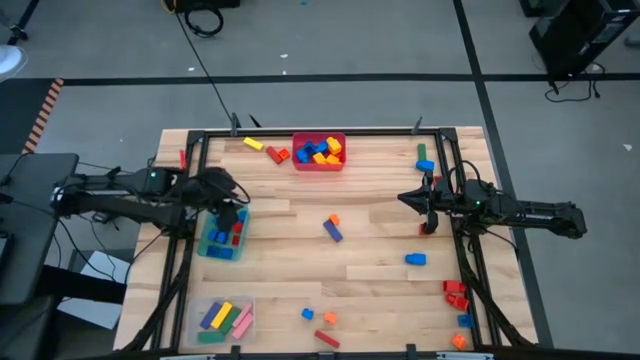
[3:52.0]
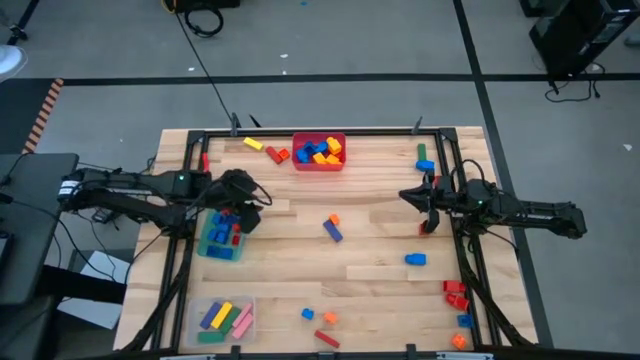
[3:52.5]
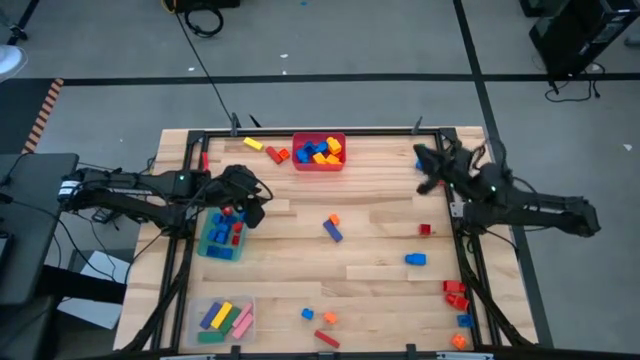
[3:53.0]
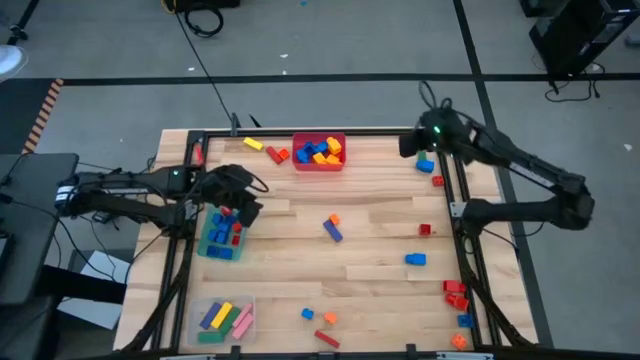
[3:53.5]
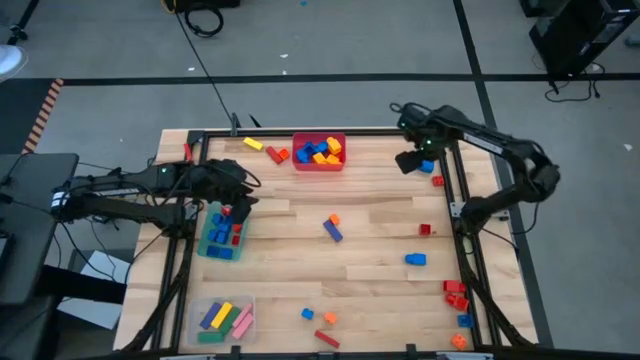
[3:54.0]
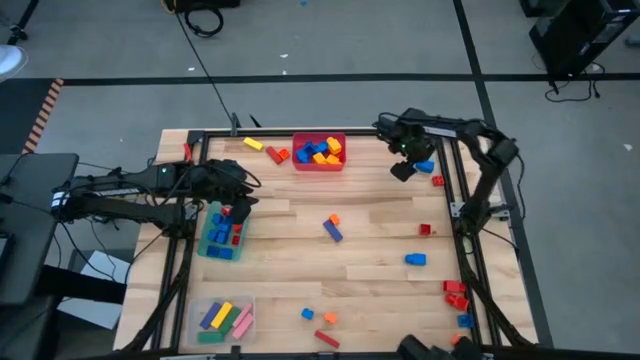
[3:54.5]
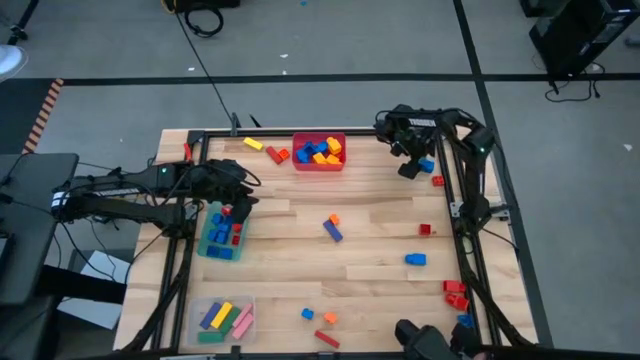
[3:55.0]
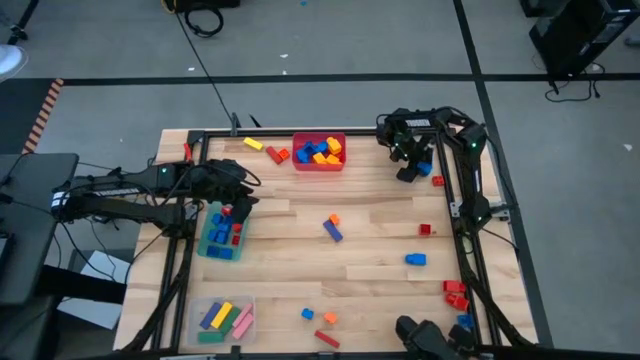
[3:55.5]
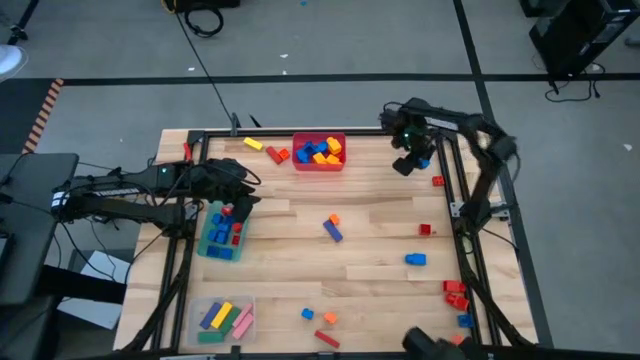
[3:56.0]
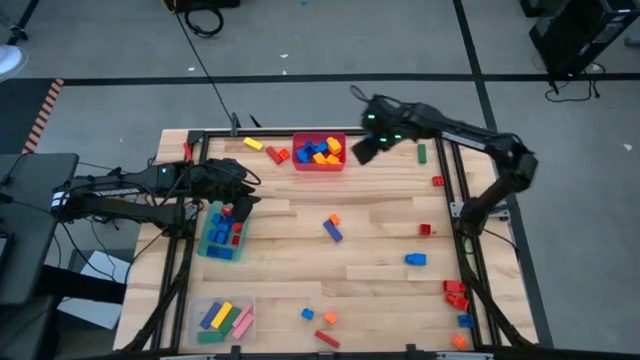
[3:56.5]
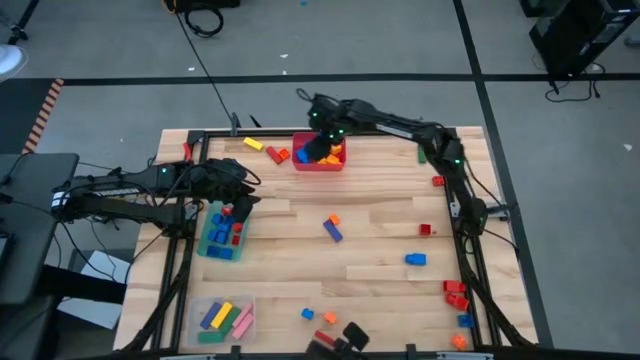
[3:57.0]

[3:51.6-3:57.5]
Task: Sort blocks by size
Put the blue 1 studded building block into the red bin

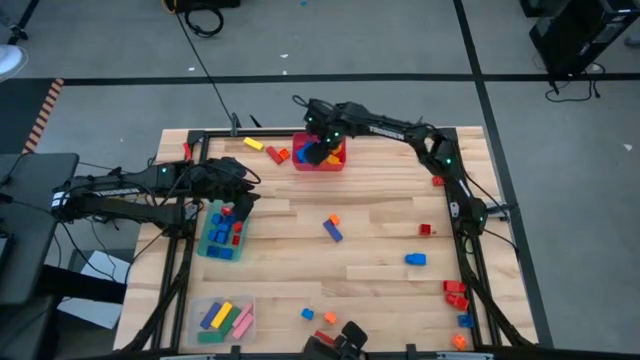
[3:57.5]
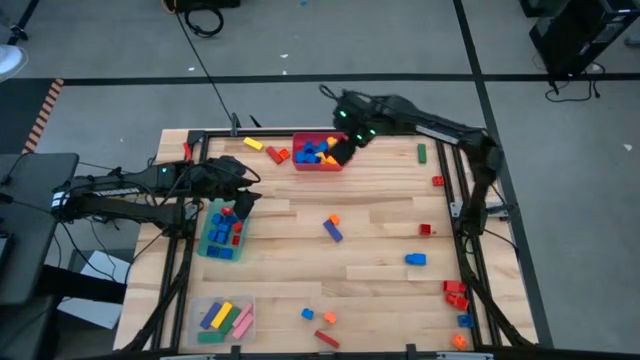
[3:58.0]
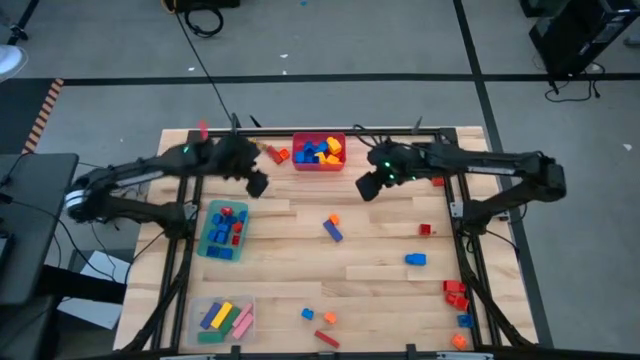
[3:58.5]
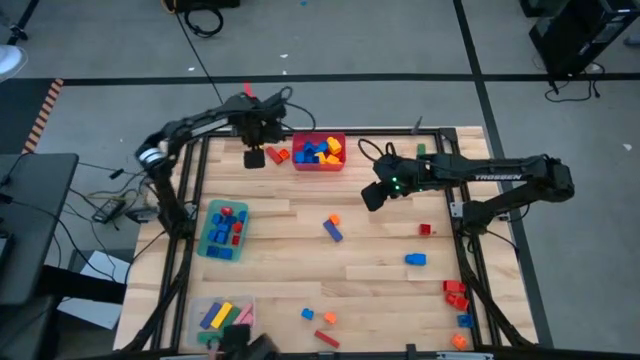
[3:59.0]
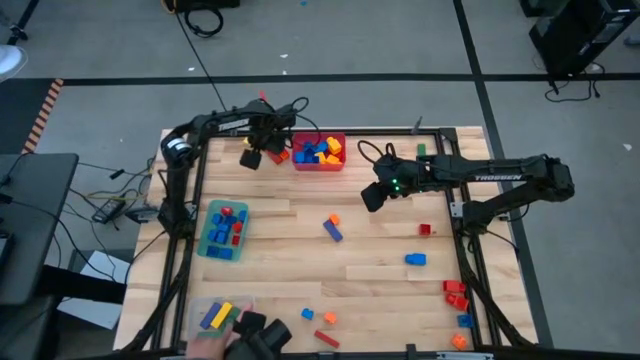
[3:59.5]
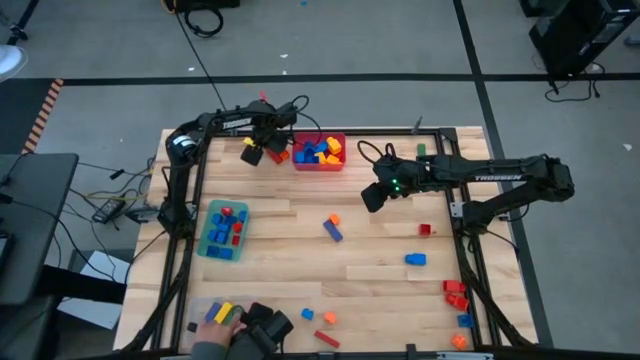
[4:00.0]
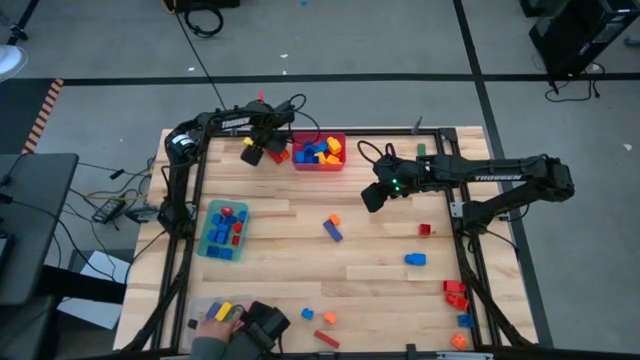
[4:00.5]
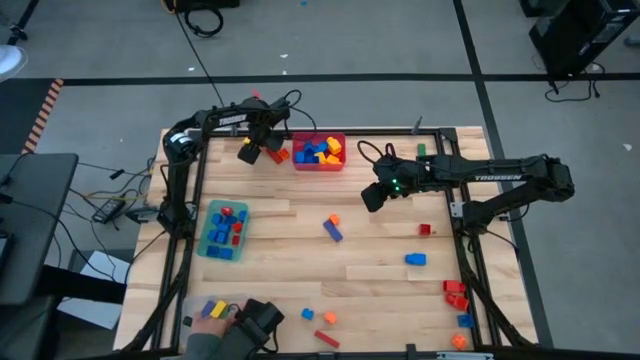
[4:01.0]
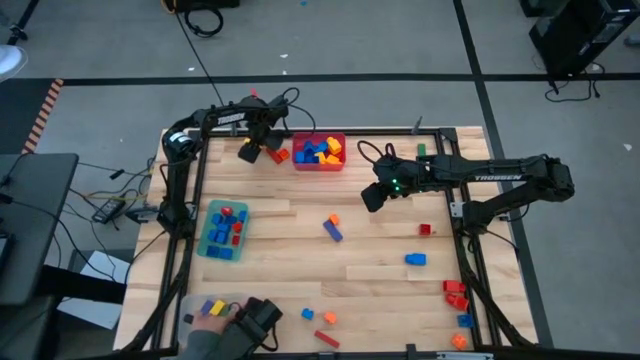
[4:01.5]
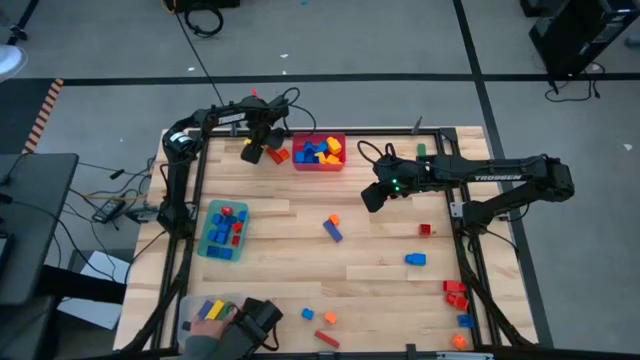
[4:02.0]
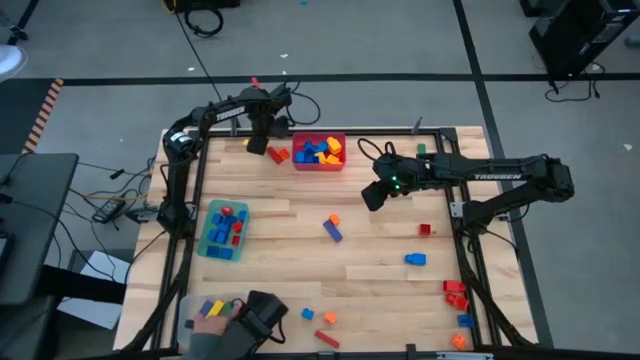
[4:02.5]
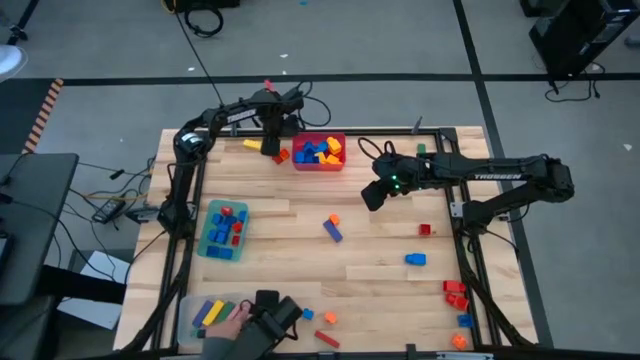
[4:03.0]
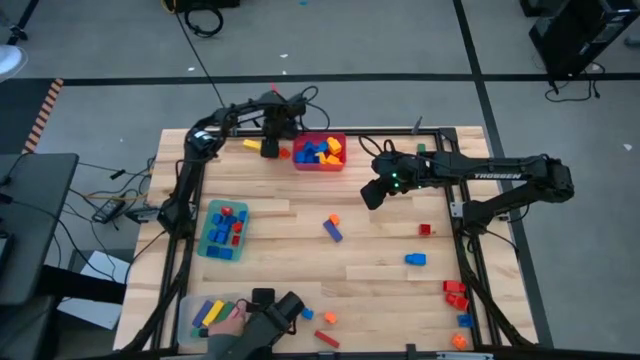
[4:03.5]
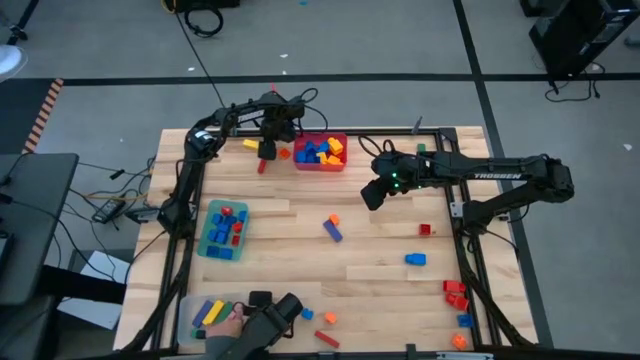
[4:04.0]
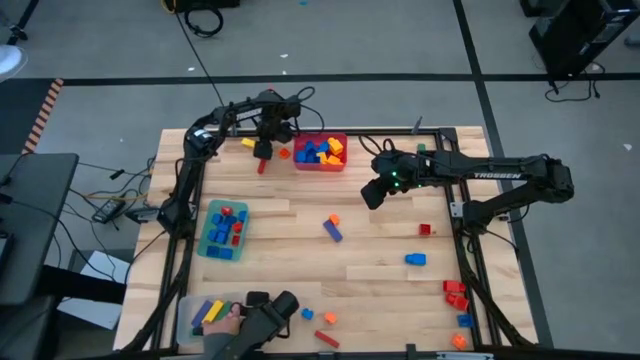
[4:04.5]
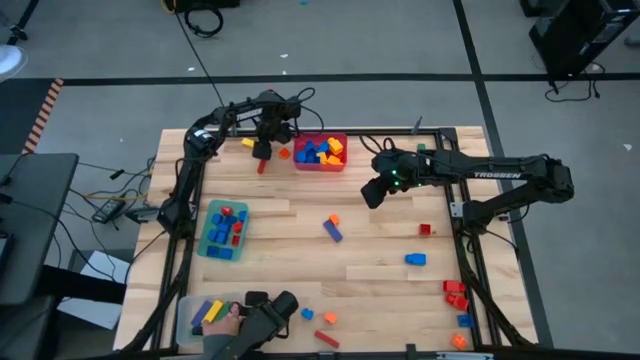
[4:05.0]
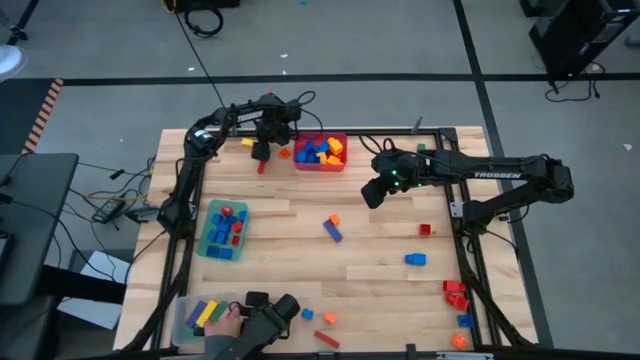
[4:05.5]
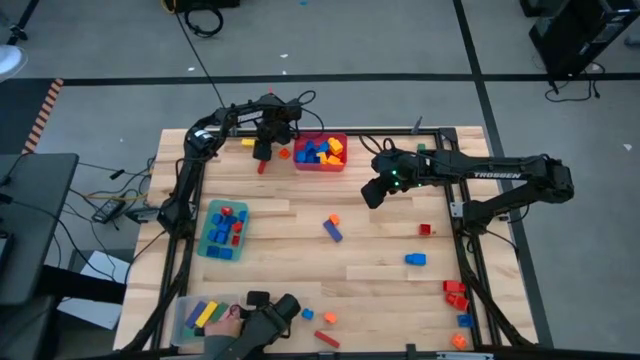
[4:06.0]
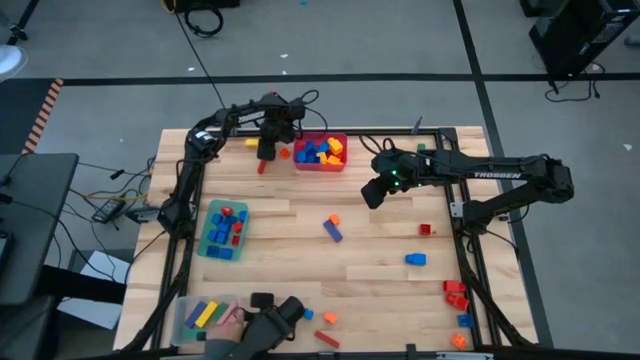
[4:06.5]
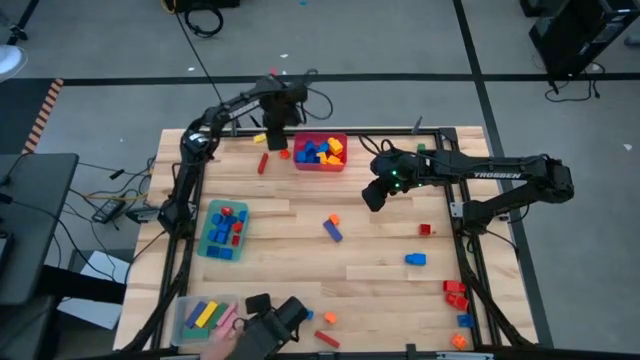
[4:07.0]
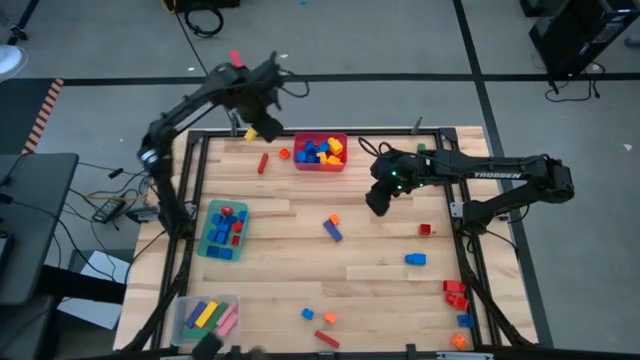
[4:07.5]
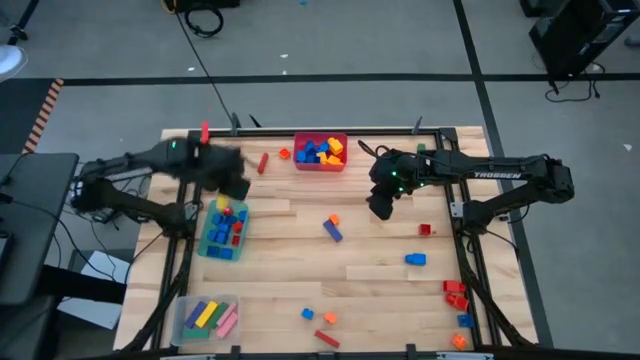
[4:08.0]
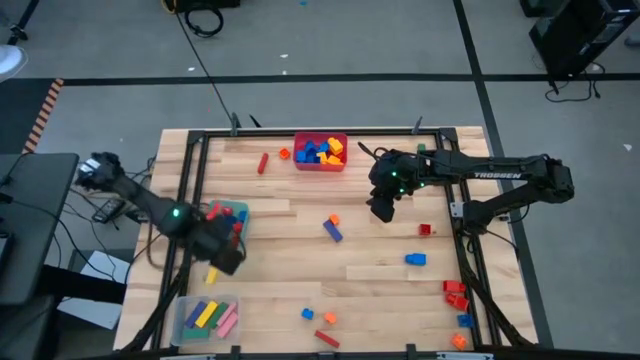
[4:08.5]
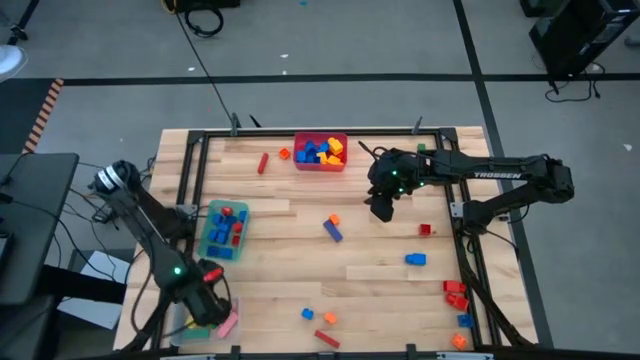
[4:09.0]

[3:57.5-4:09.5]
Put the yellow rectangle block into the transparent bin

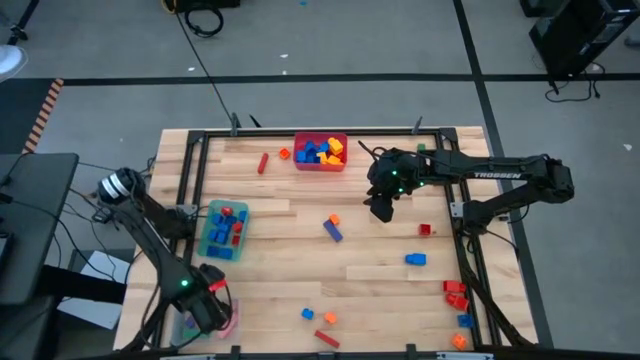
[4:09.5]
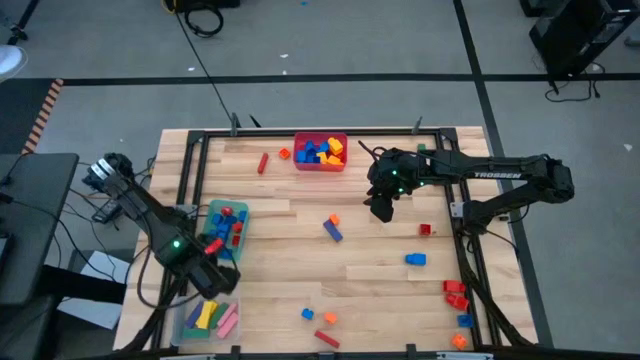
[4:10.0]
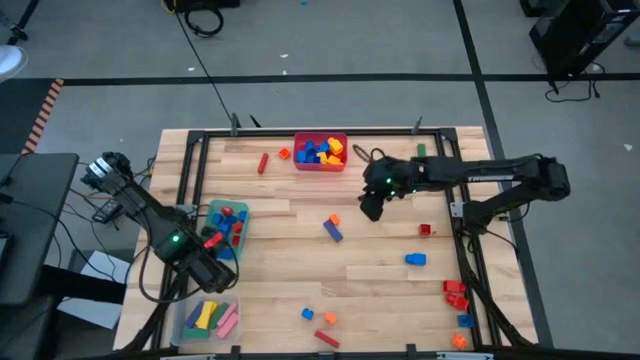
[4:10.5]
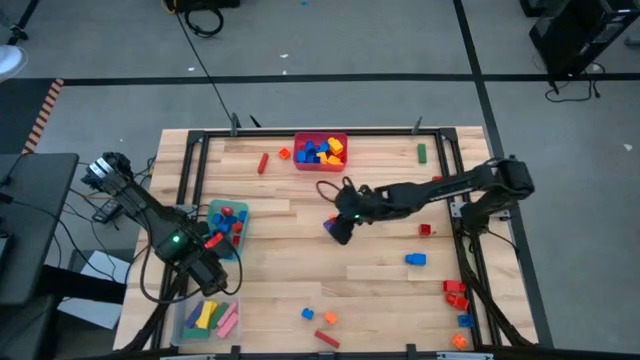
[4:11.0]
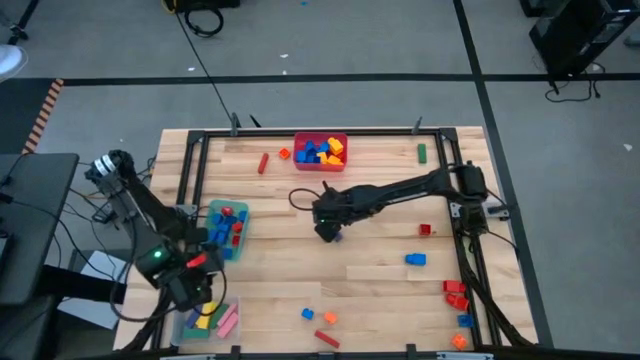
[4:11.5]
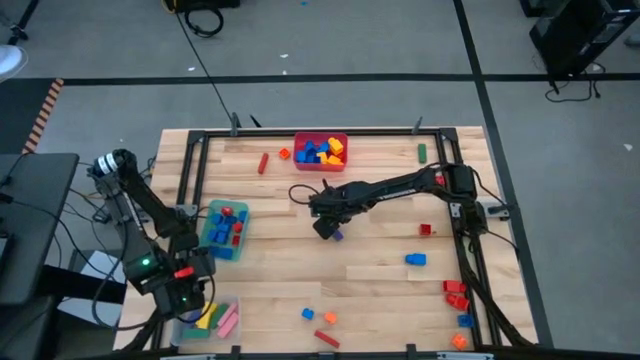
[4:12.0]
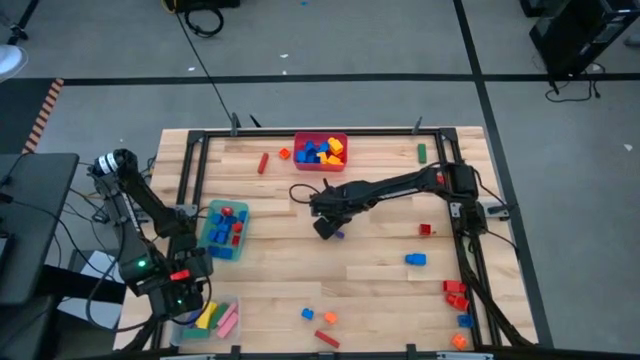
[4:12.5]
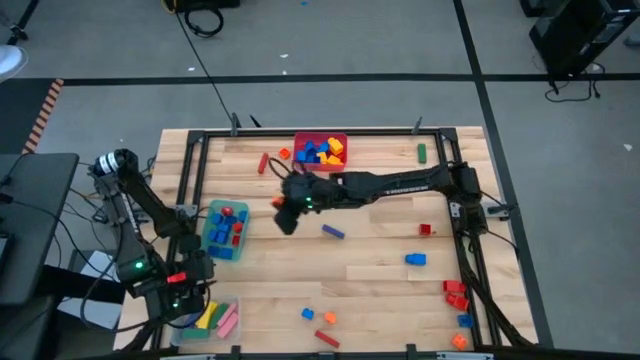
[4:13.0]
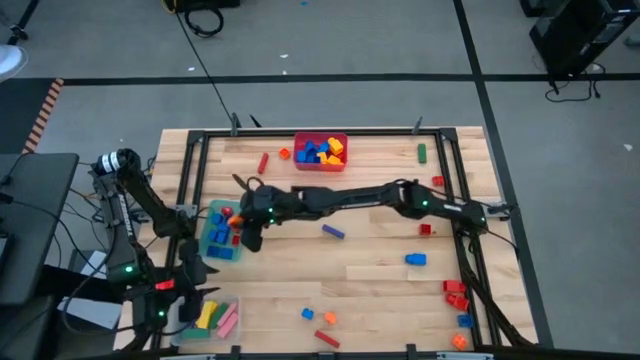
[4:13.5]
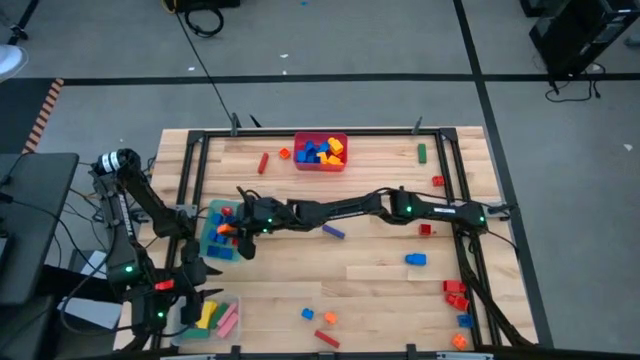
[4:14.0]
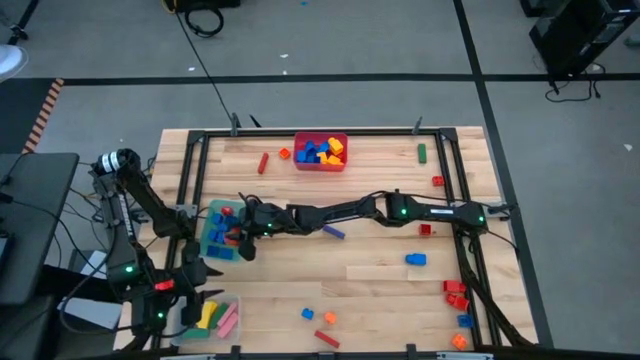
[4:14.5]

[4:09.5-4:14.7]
Put the orange 4 studded building block into the teal bin
